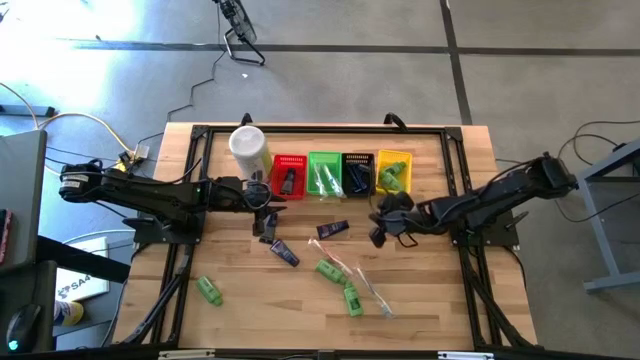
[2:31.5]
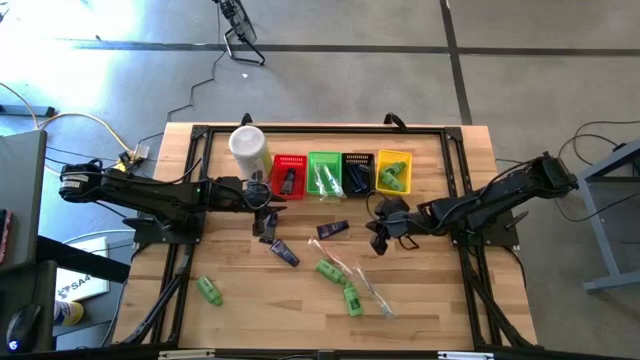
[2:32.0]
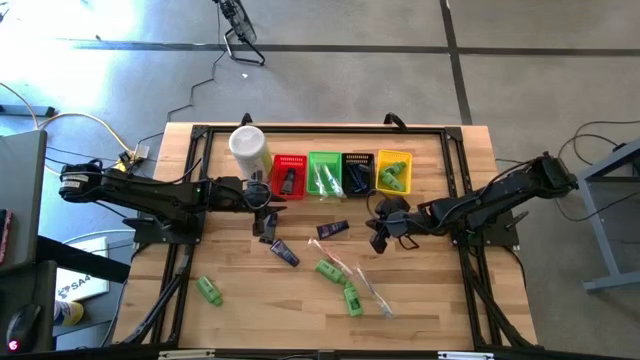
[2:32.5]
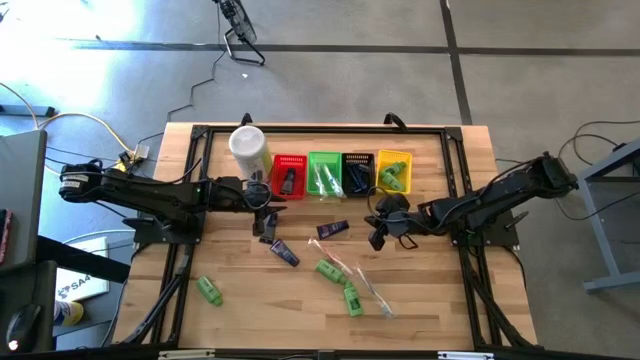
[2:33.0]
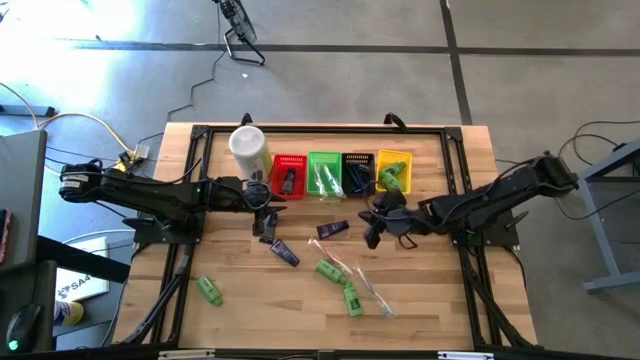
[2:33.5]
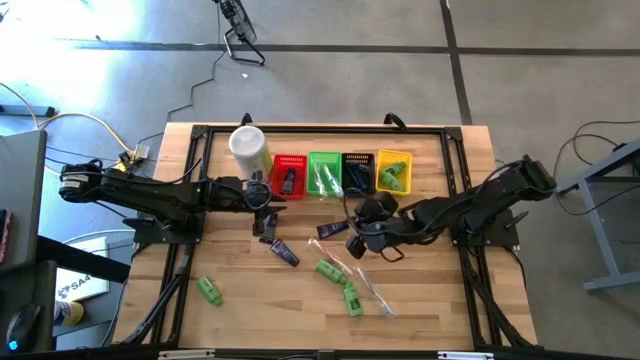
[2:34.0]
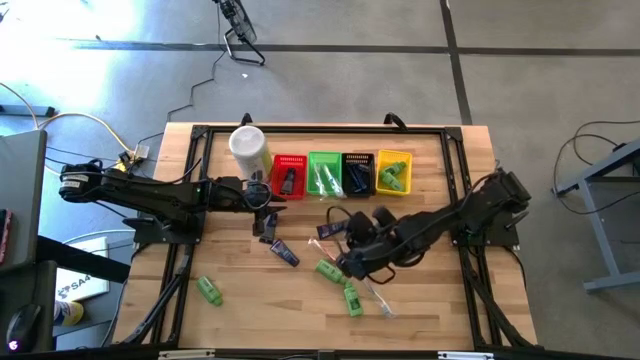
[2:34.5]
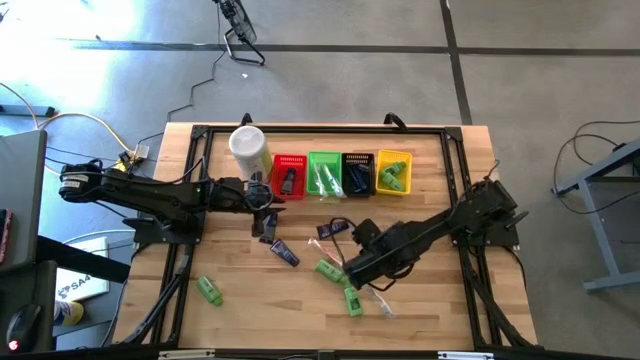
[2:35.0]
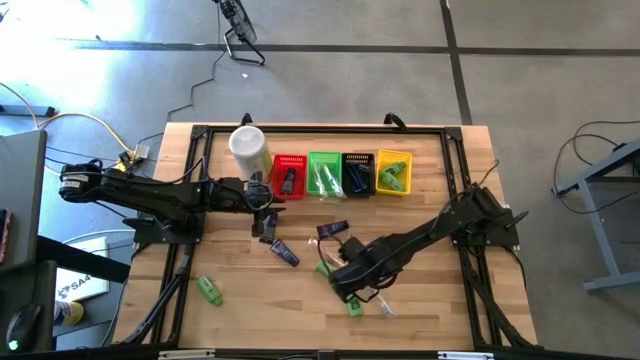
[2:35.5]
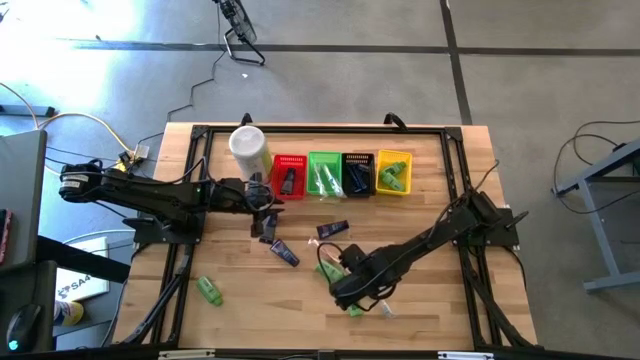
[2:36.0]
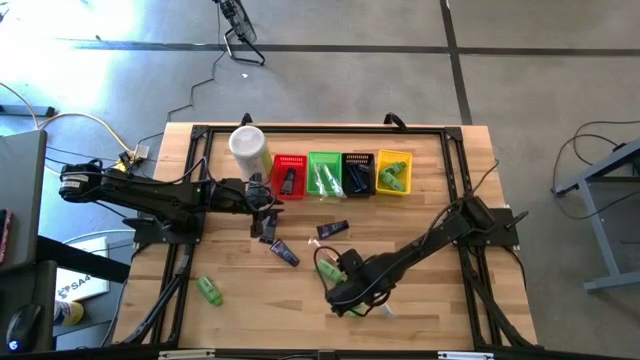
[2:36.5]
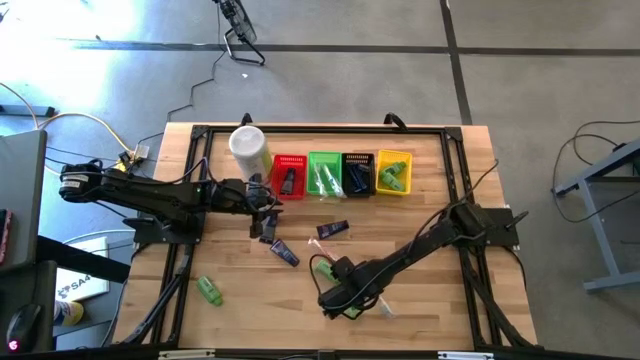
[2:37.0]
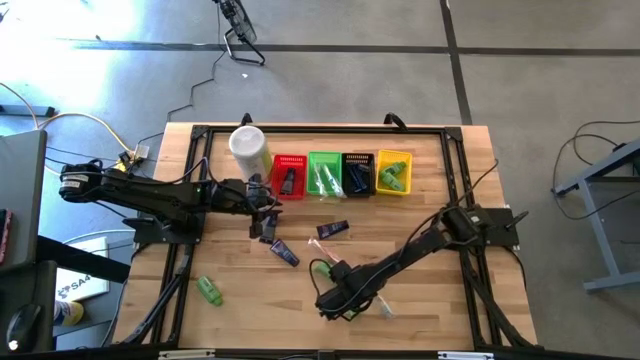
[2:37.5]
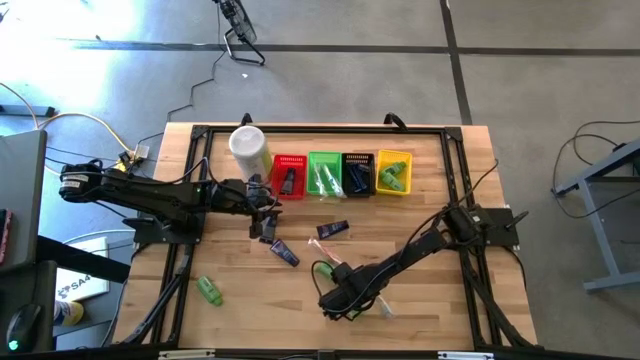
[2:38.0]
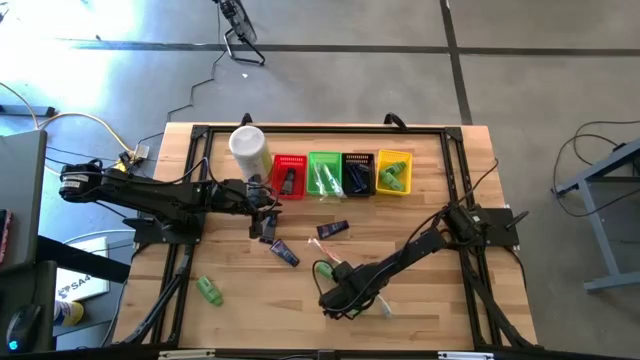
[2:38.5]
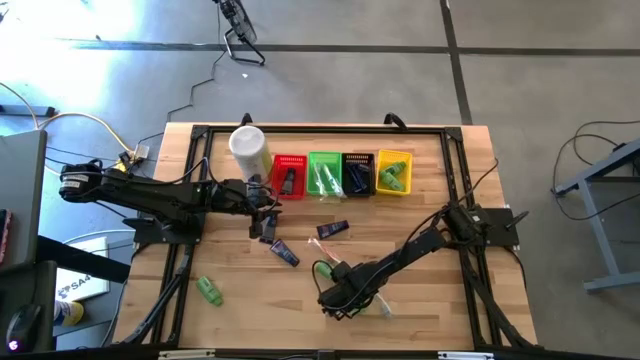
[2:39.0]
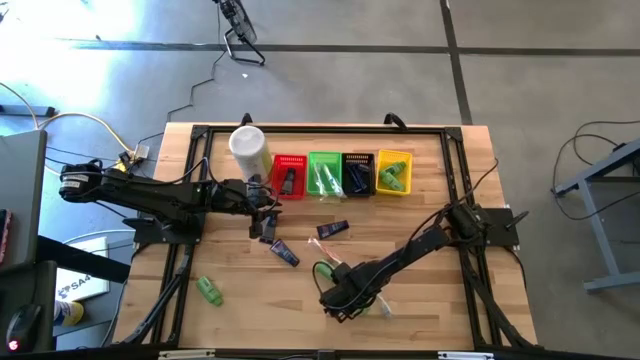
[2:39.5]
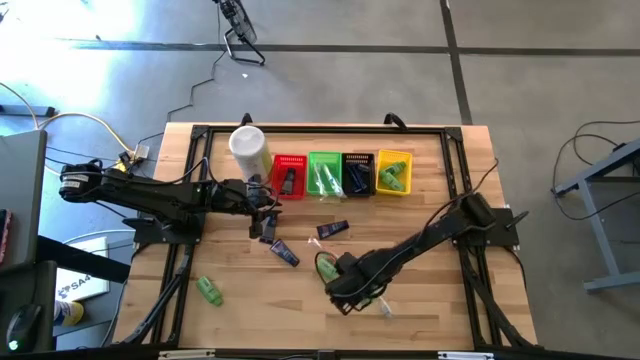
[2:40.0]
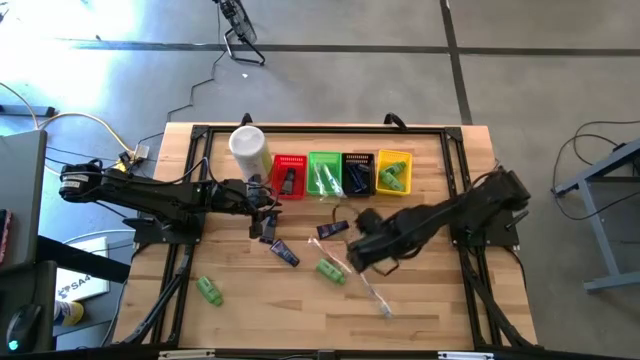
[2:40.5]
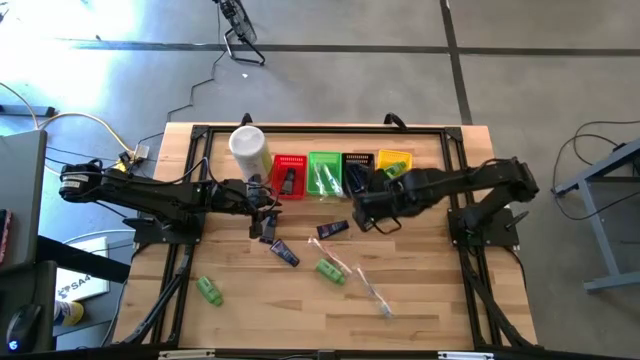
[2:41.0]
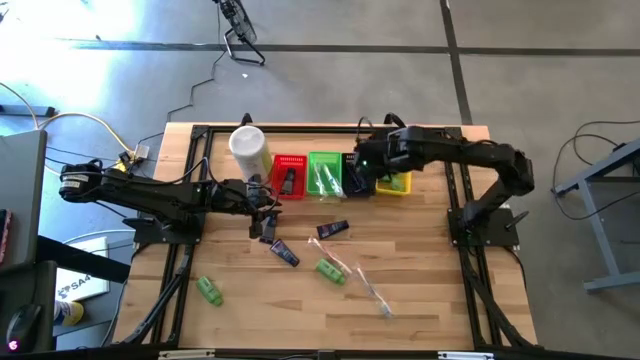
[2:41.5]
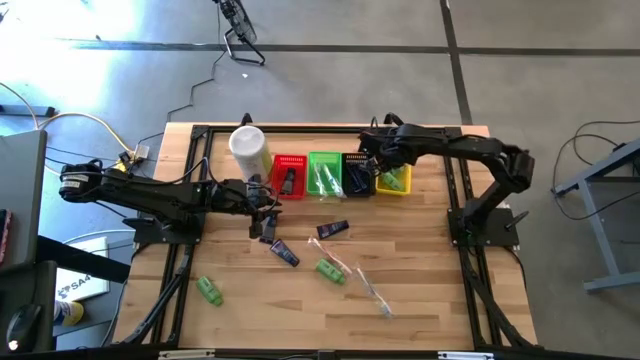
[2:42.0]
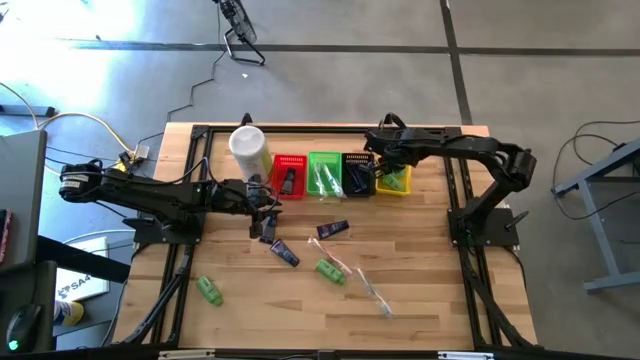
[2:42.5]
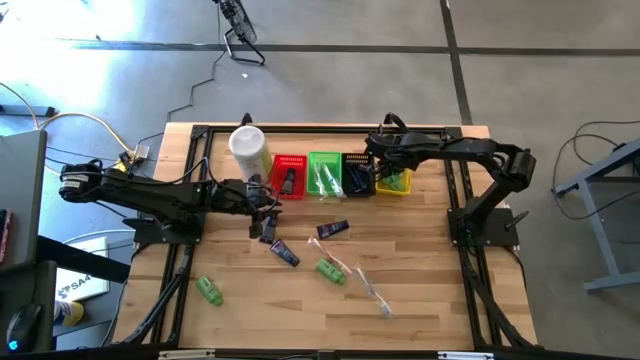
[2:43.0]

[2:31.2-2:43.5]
Task: Pick & Place Travel size toiletries
Put the green shampoo into the yellow bin

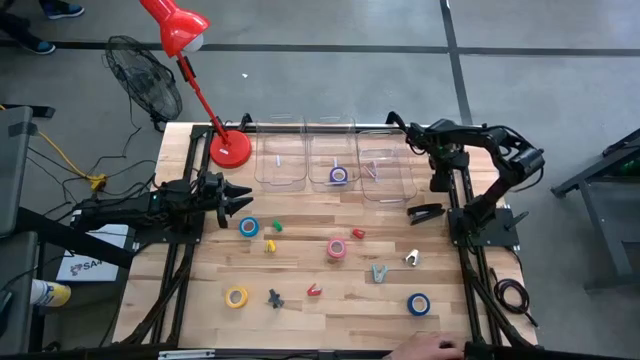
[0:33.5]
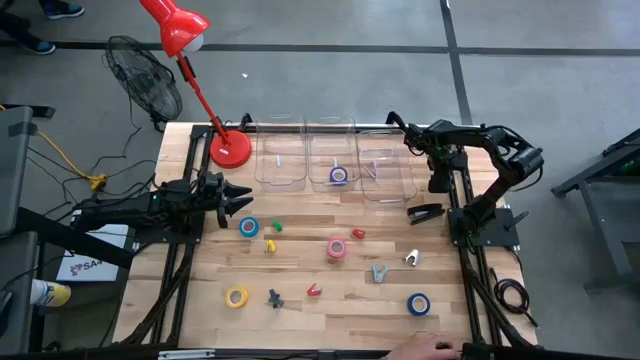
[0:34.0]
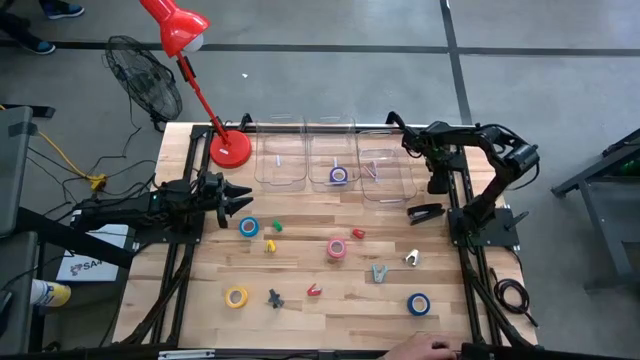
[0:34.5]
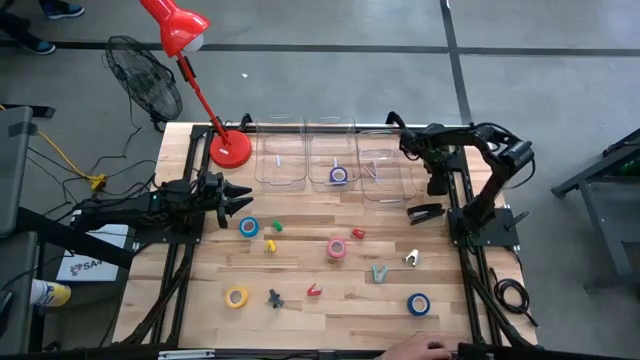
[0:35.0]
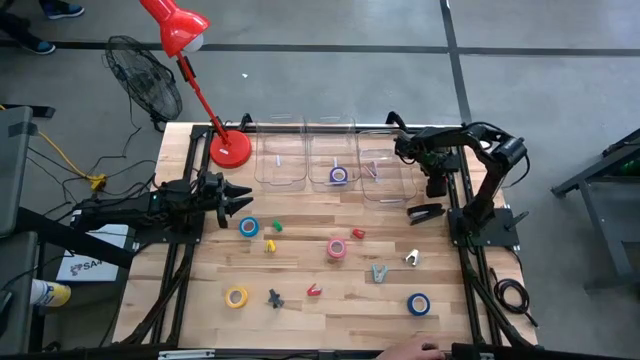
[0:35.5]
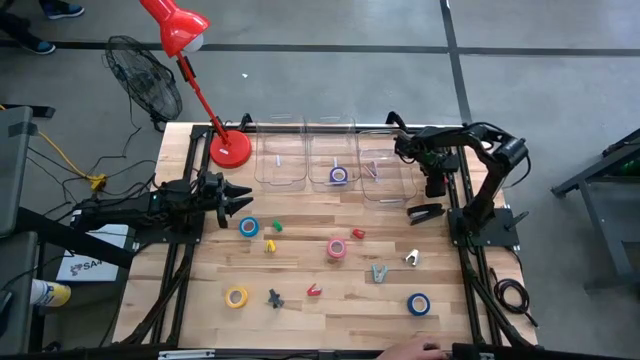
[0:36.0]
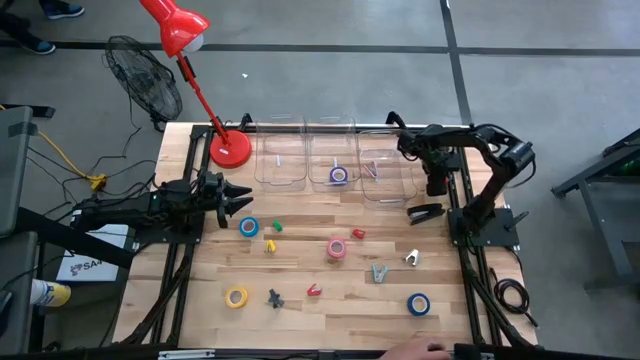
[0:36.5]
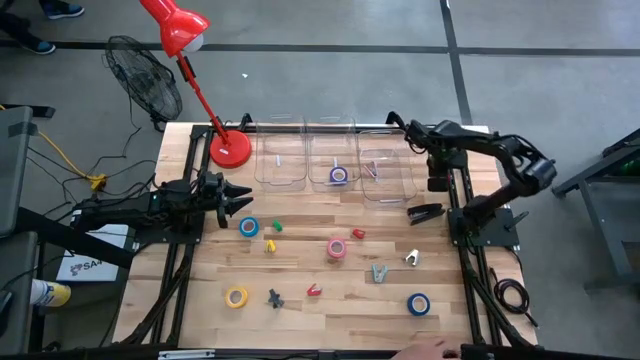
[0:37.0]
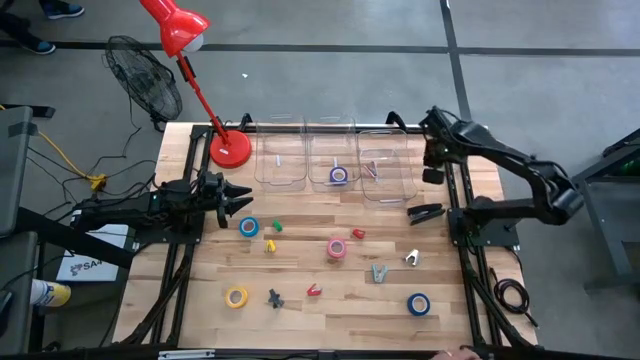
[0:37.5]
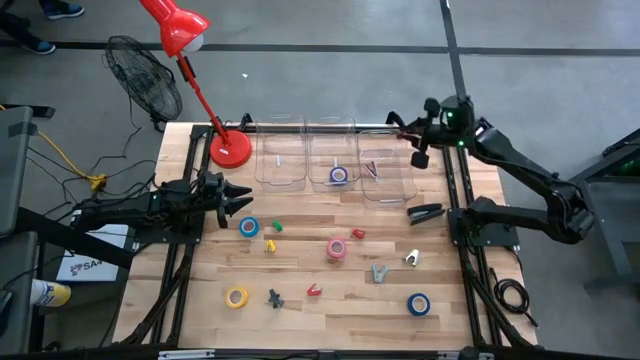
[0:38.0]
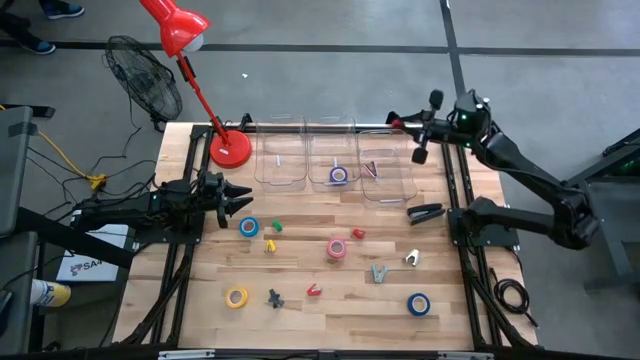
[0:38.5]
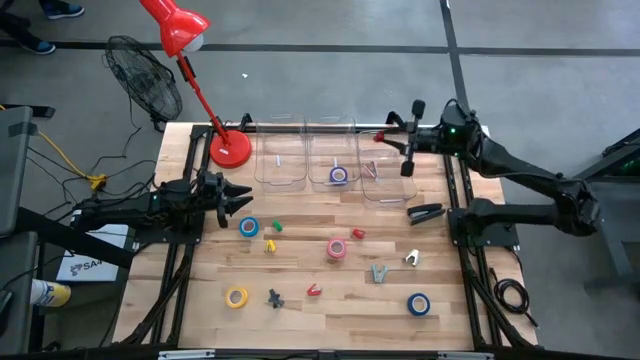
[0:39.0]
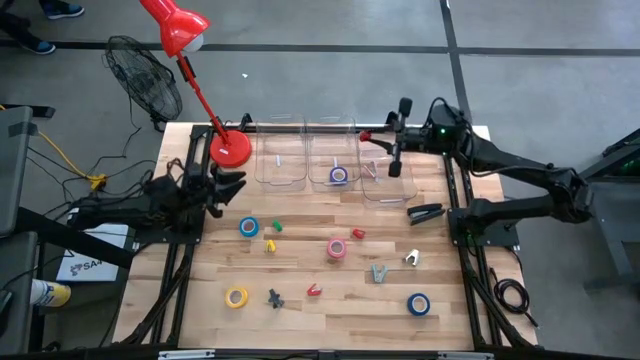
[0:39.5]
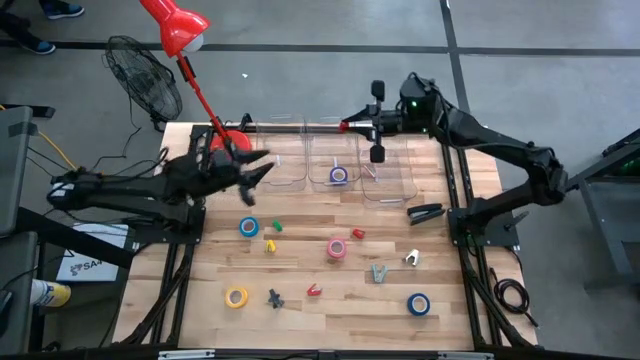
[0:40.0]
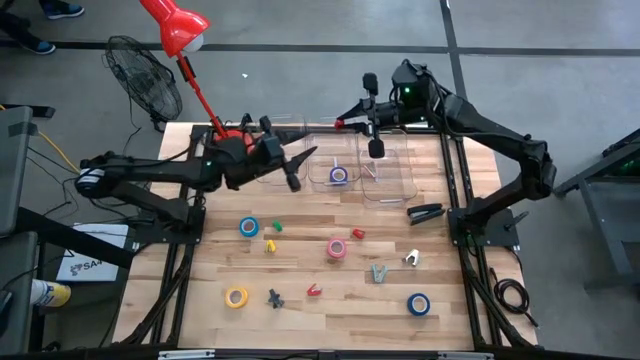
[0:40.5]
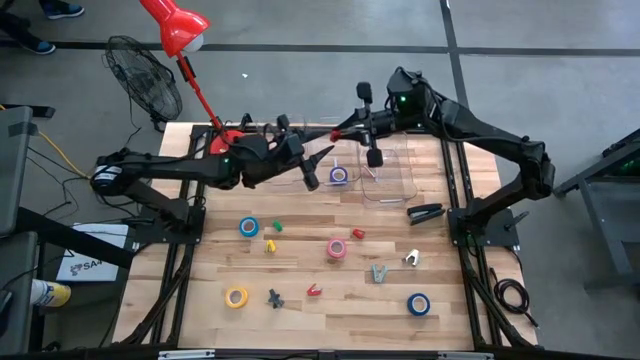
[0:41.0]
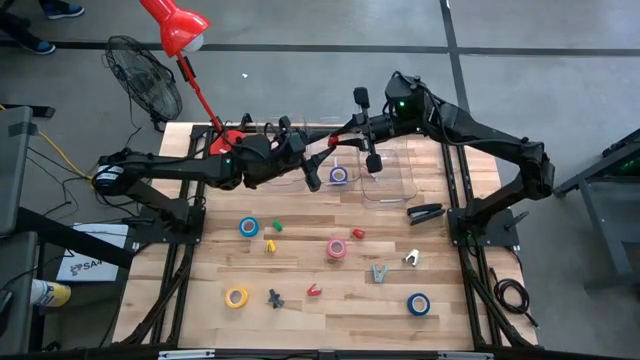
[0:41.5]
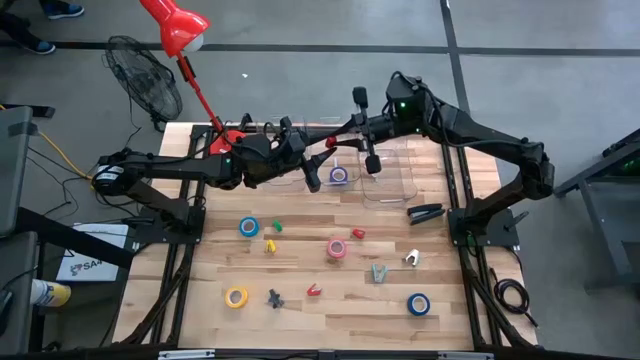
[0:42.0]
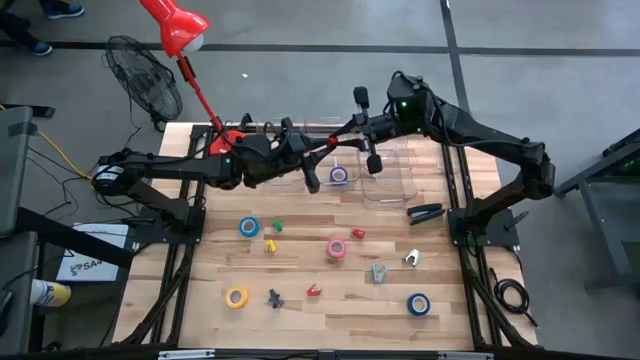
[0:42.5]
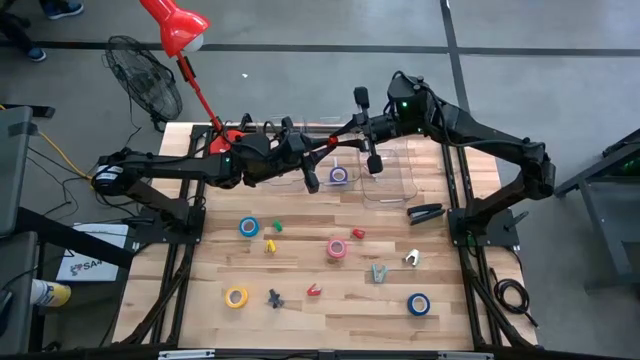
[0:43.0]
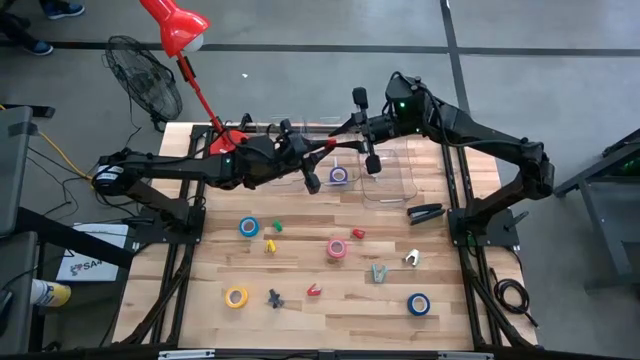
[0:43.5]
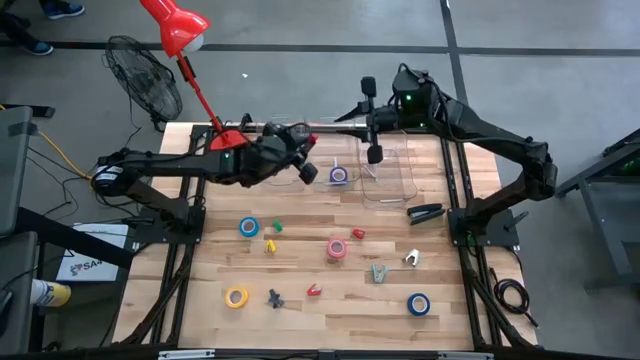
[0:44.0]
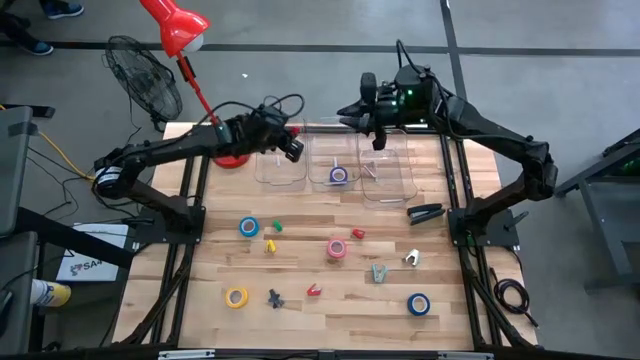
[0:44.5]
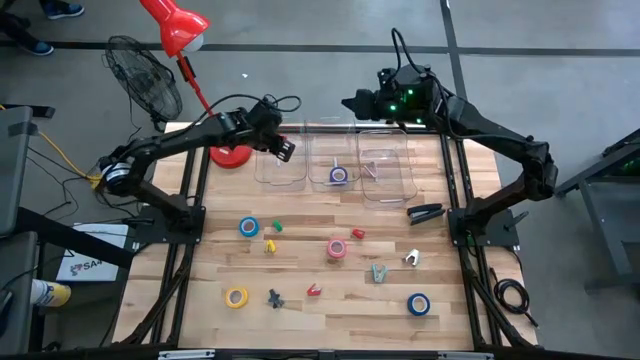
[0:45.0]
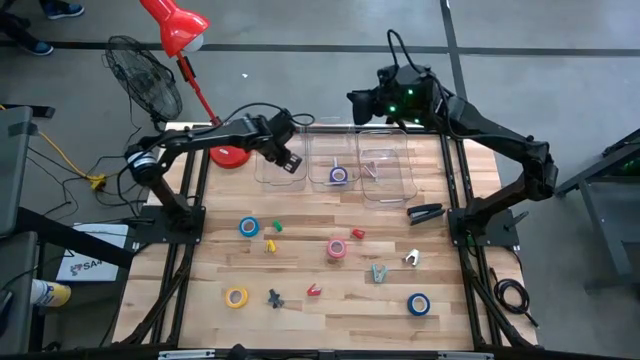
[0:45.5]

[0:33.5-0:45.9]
Task: Pick and place Stapler, Stapler remover, tape
Put the top right red stapler into the left transparent bin
